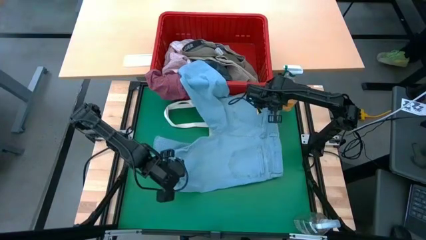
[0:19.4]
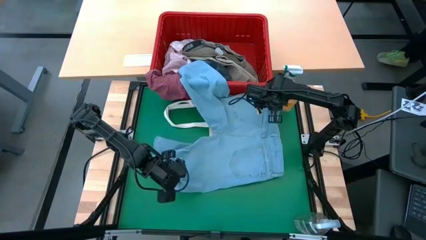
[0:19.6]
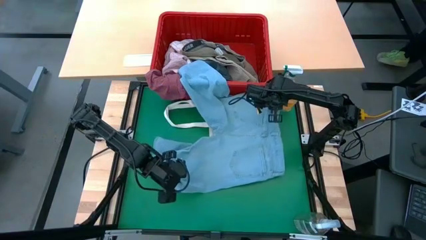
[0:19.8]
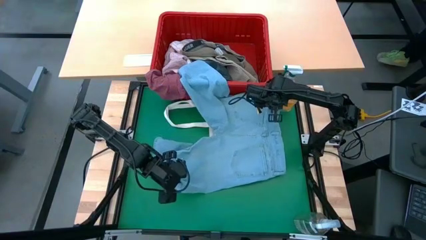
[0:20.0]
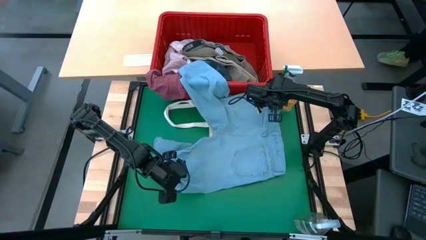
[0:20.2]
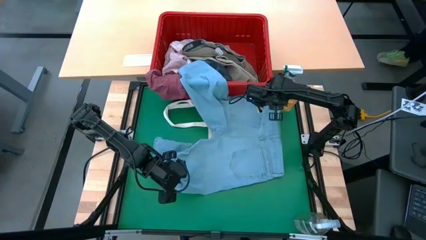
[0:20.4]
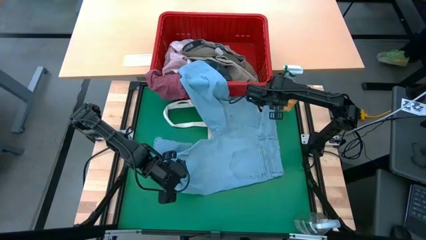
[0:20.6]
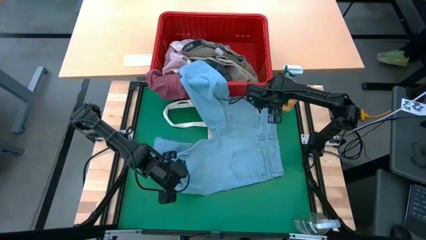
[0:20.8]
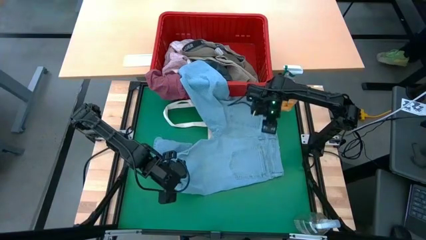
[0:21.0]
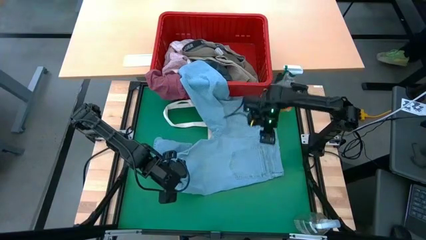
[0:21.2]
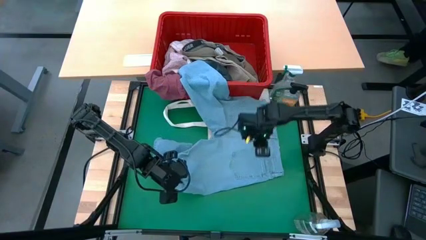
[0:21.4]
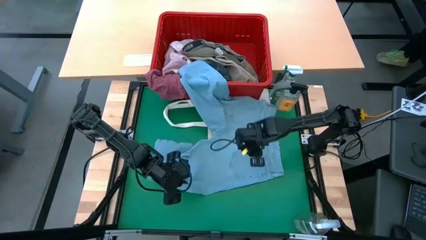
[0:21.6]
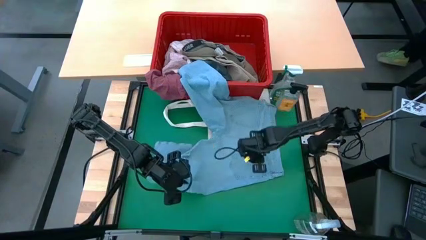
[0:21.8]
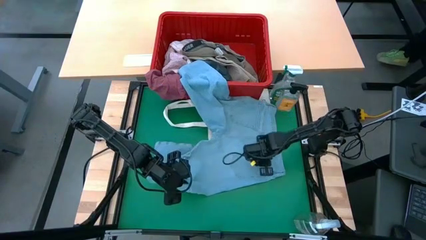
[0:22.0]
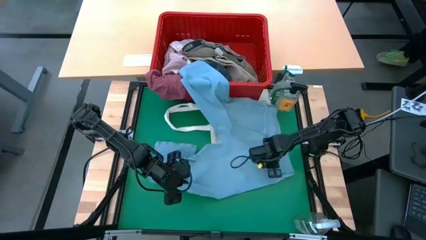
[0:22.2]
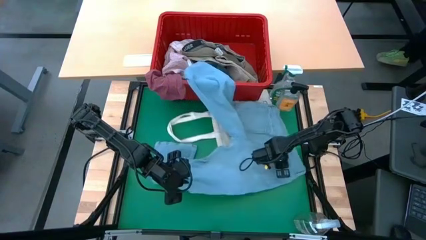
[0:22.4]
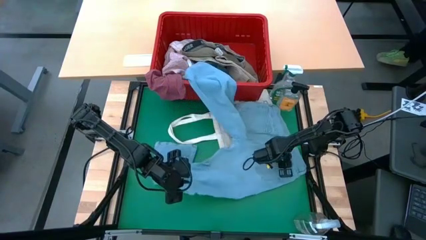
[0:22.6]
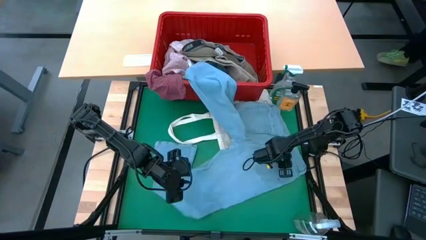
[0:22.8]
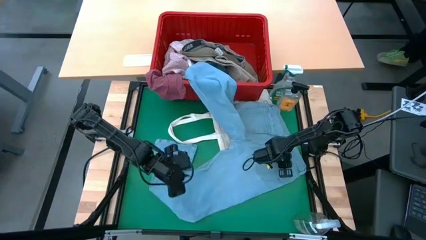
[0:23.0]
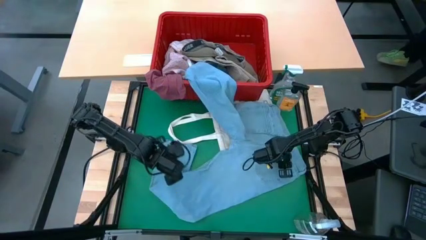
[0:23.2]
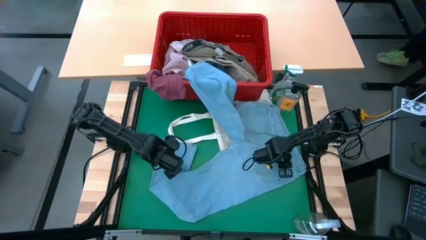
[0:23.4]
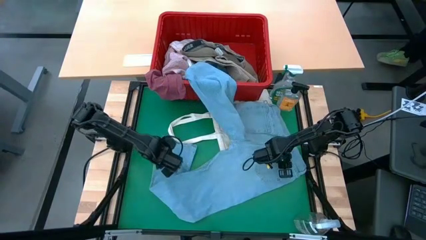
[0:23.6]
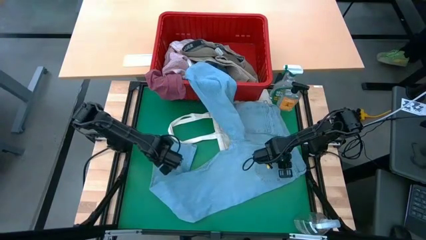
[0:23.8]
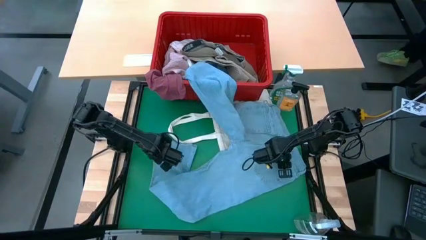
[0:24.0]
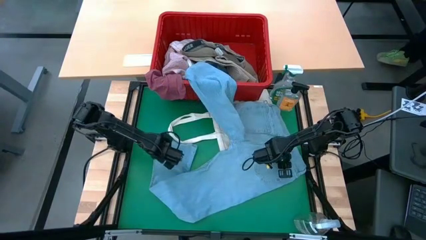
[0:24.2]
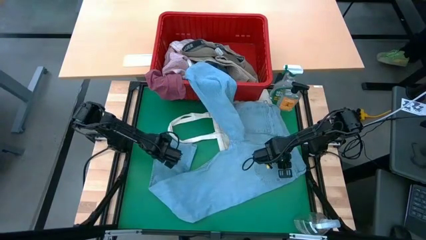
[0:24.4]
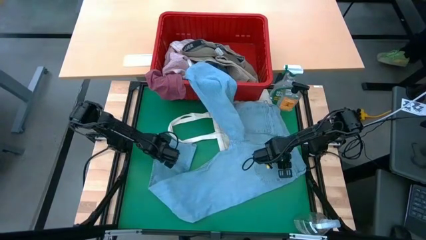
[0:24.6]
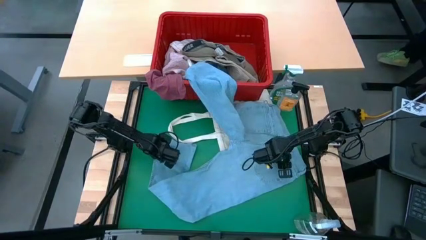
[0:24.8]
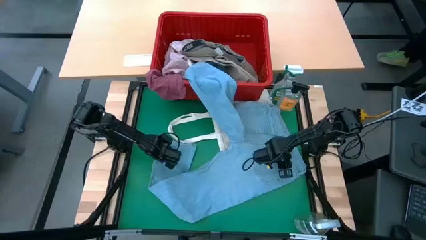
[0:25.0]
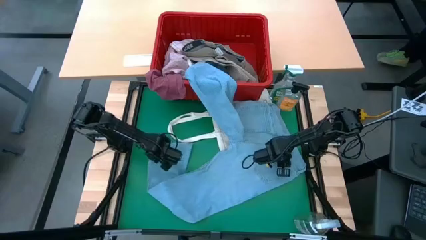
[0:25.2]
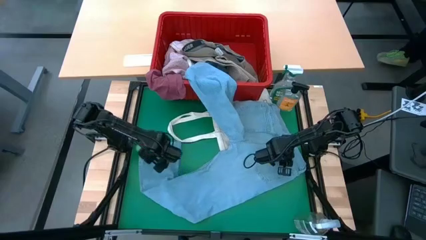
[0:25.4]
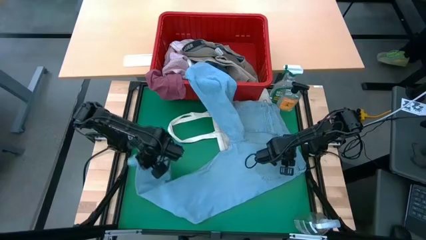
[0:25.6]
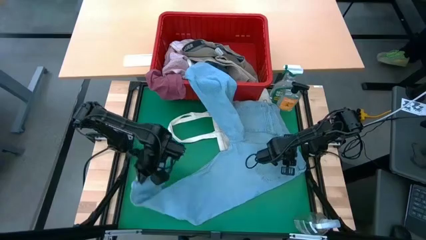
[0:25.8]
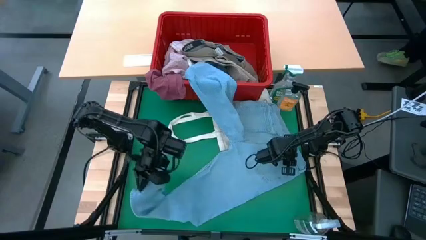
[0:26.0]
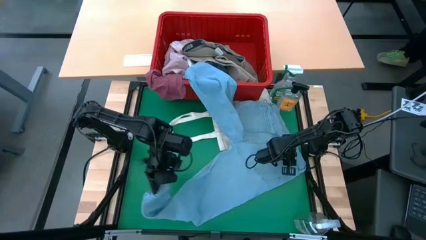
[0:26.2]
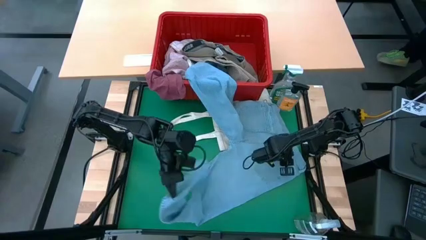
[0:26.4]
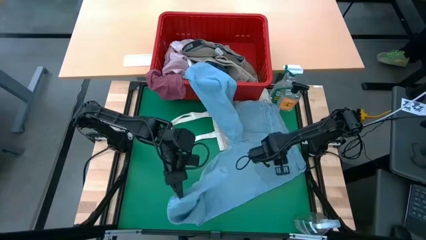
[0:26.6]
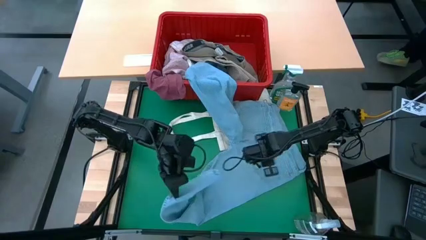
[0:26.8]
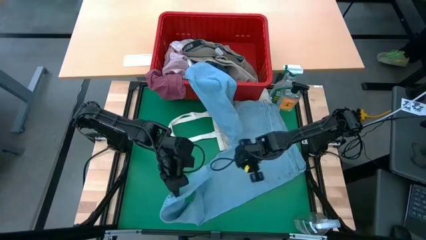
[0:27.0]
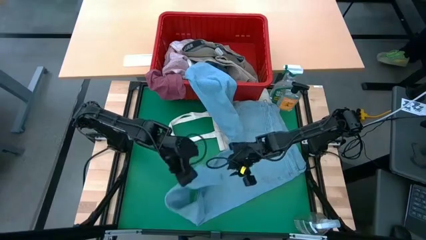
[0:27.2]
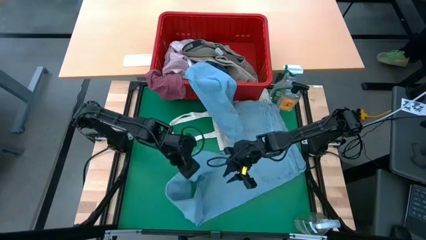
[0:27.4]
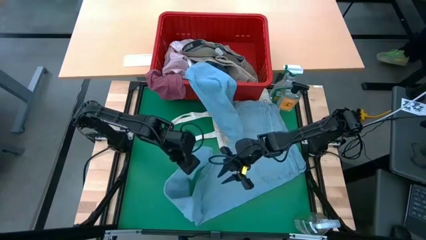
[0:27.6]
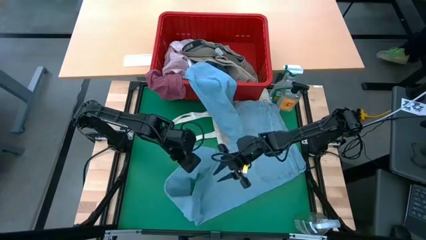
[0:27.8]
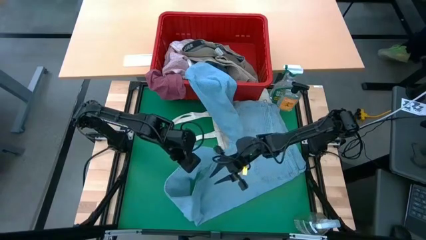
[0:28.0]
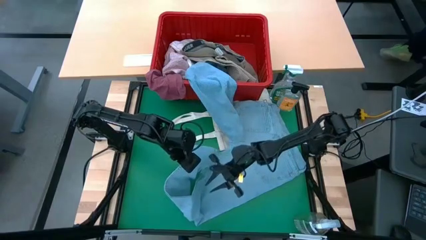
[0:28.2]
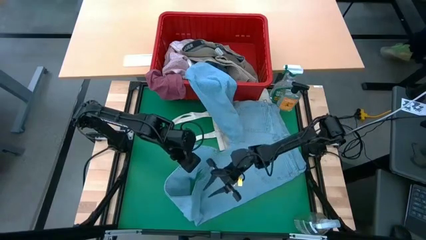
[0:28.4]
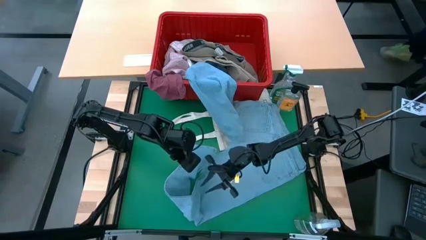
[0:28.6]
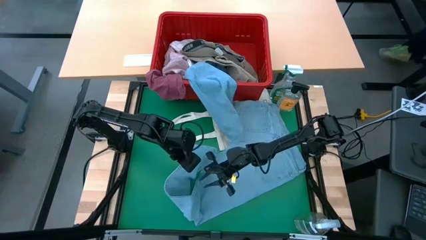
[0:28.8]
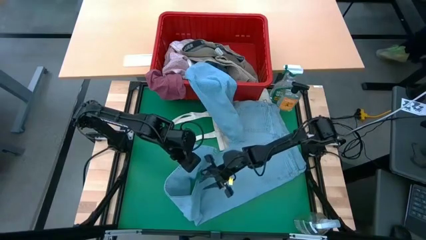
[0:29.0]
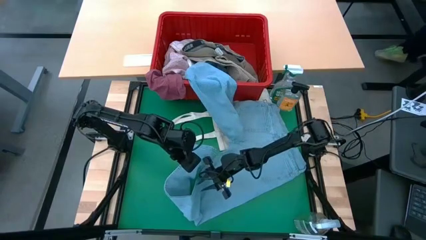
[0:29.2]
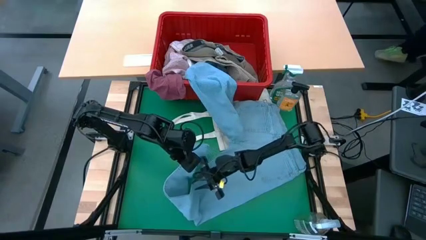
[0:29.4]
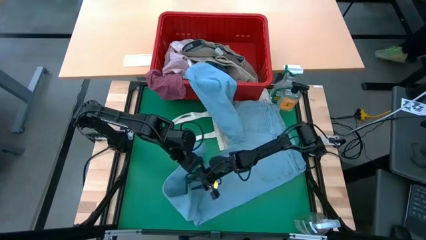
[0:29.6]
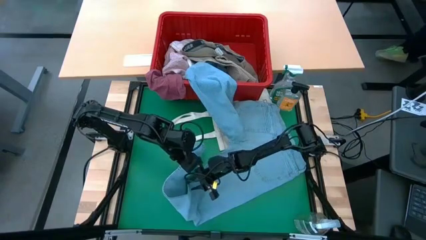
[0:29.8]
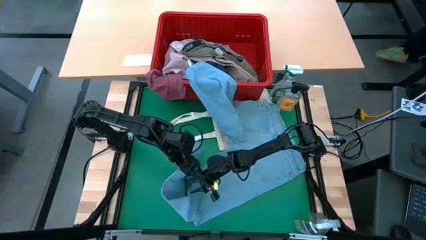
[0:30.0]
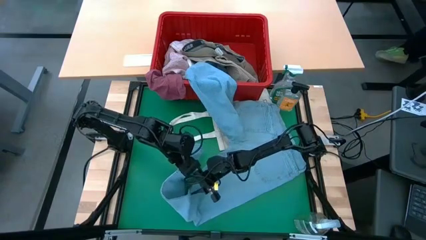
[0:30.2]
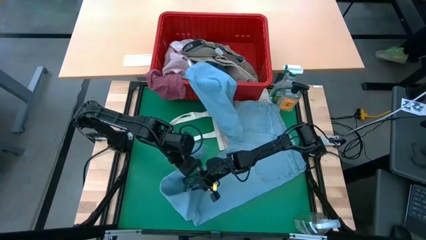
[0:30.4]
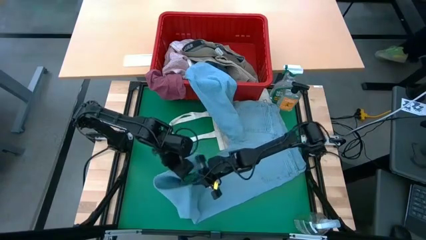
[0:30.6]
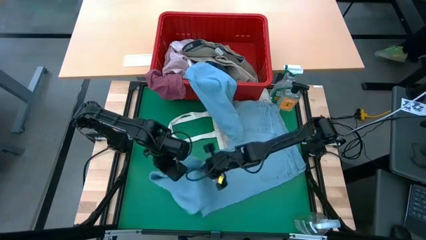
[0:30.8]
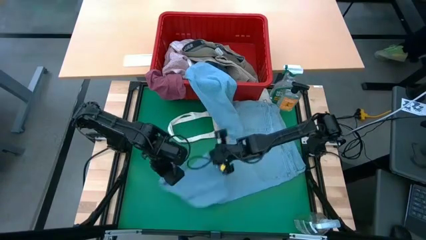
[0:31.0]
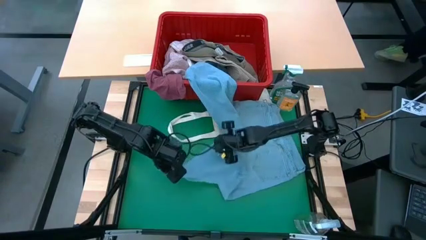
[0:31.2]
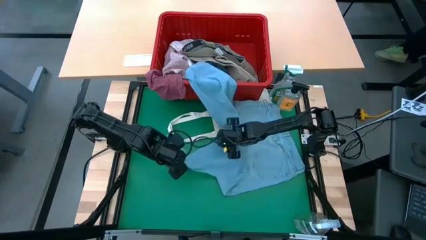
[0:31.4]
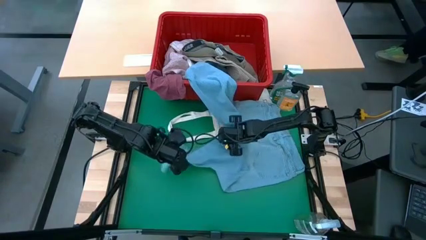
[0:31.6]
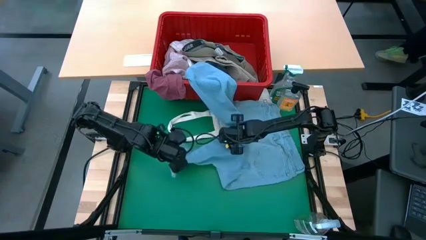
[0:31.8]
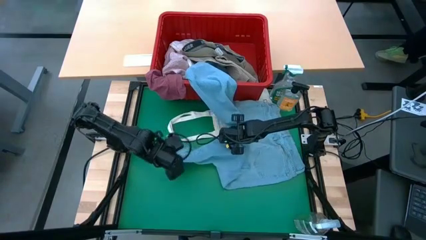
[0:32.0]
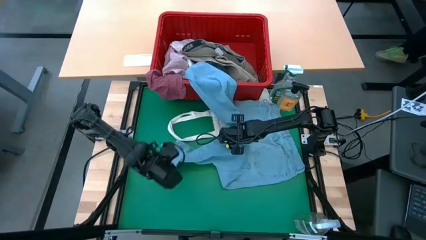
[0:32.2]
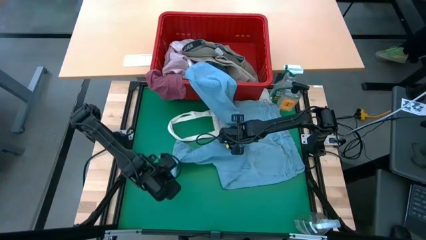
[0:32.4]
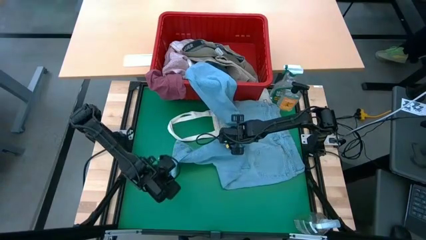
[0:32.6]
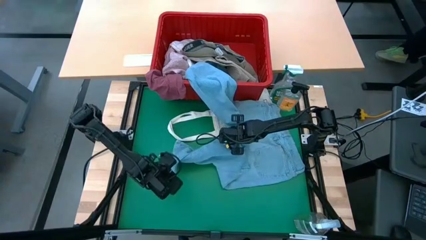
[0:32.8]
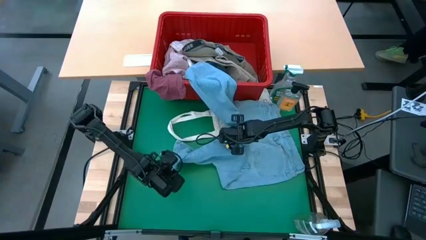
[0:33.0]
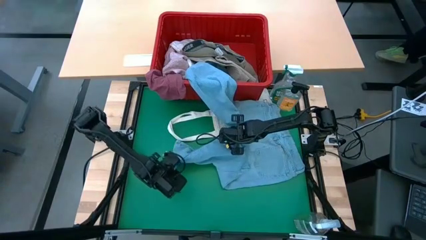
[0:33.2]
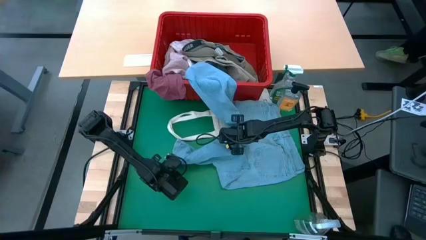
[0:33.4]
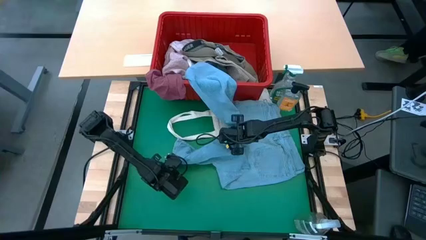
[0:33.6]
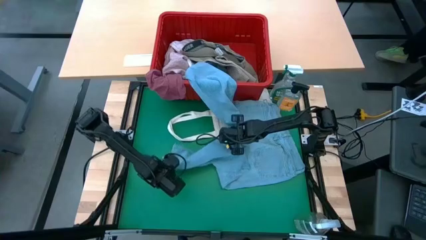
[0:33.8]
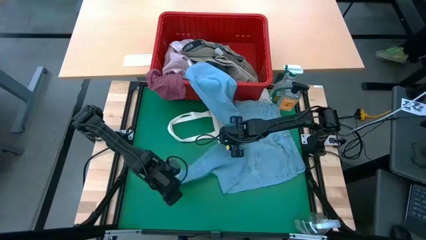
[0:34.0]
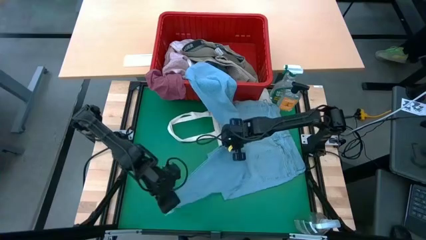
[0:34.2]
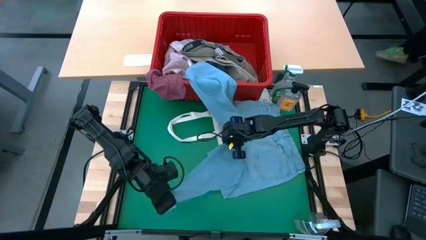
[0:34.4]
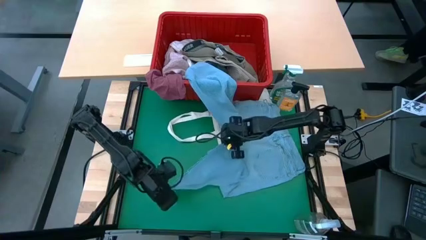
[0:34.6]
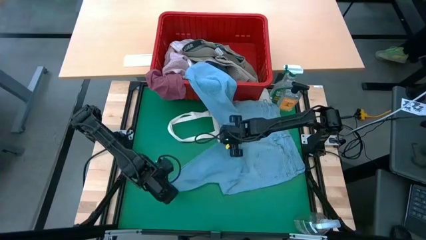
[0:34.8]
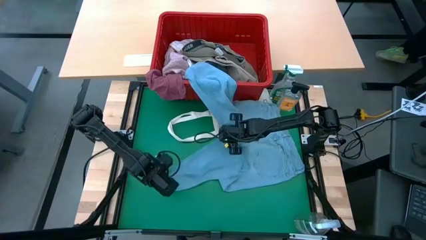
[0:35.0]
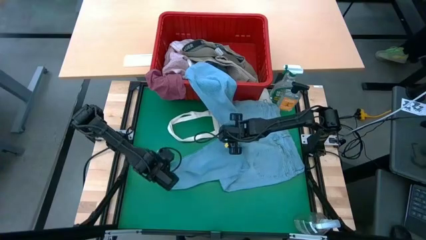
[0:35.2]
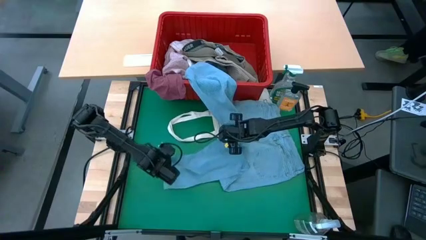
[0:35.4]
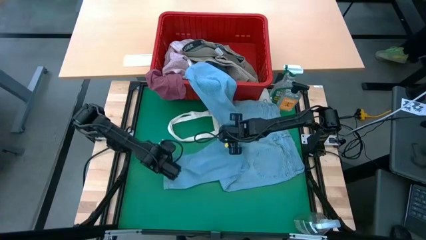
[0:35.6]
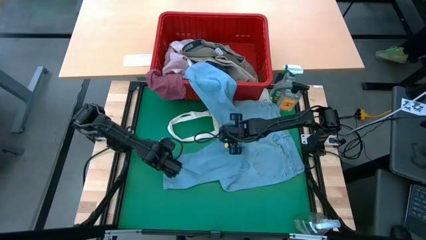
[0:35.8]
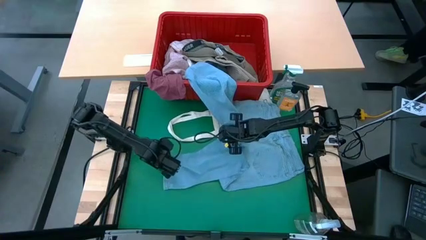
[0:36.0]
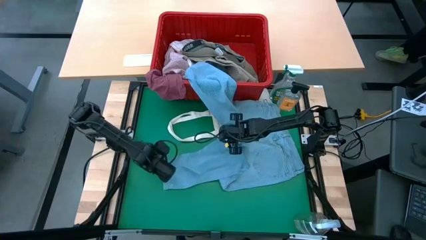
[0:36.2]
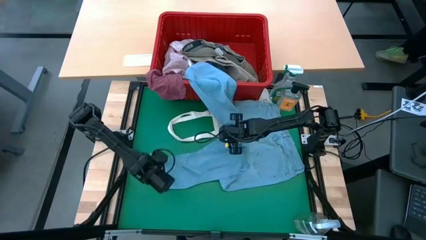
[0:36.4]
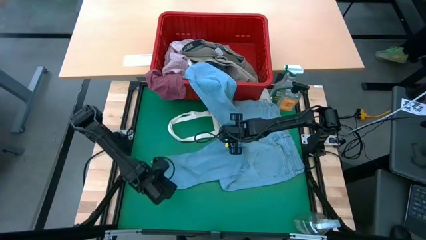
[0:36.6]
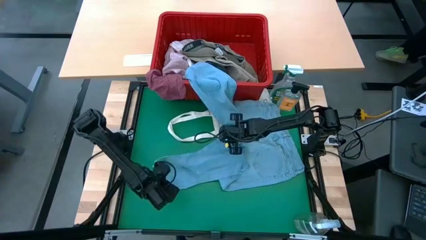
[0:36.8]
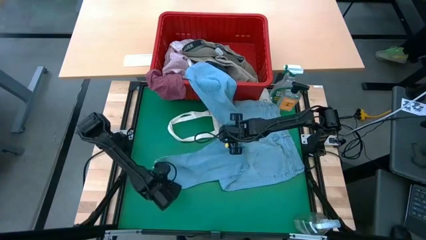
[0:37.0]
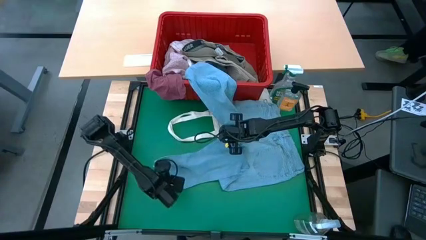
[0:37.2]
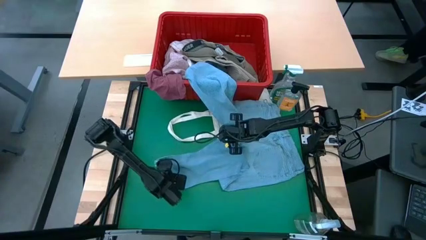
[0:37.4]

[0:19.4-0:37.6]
Task: Fold Laundry from Bin
Fold the blue pants from the red laundry basket
